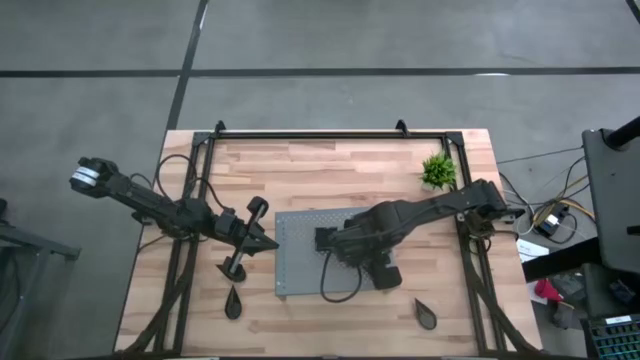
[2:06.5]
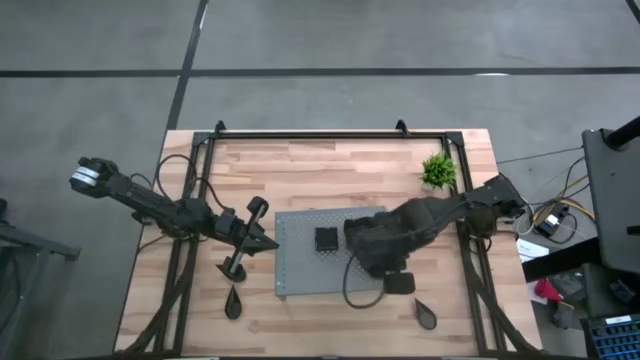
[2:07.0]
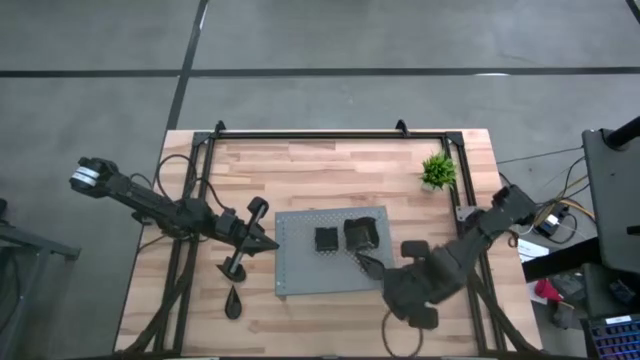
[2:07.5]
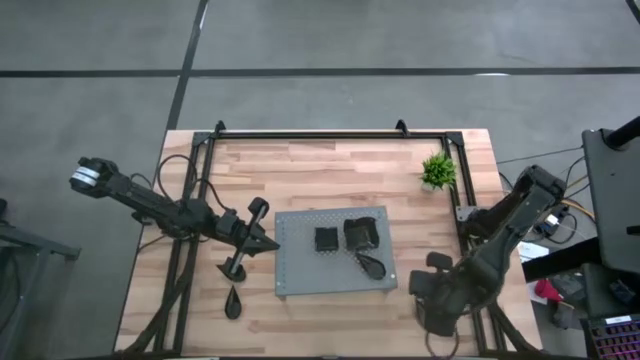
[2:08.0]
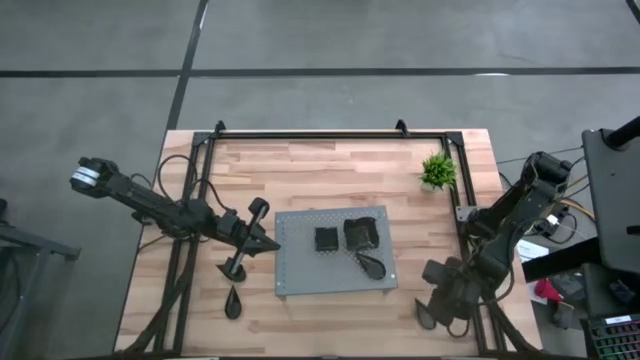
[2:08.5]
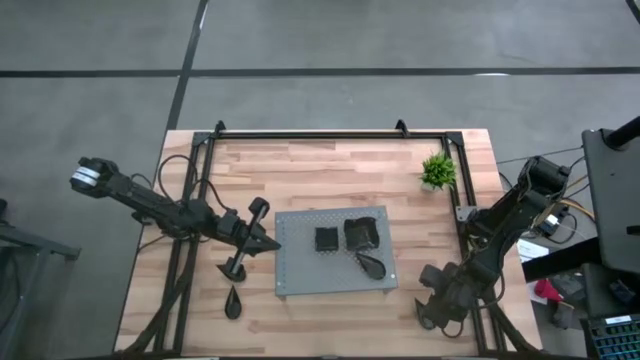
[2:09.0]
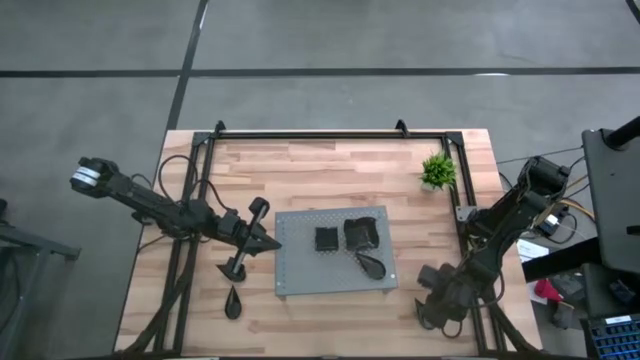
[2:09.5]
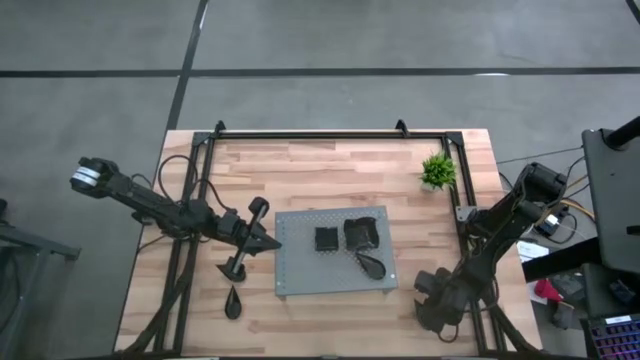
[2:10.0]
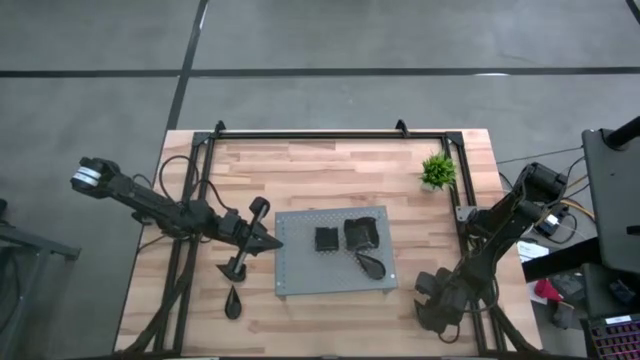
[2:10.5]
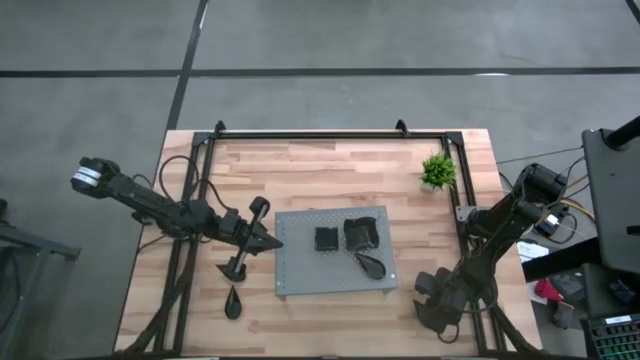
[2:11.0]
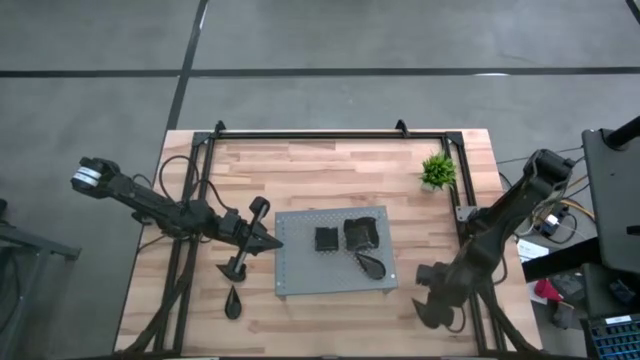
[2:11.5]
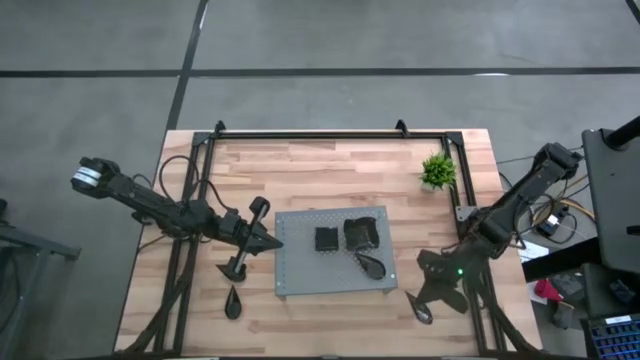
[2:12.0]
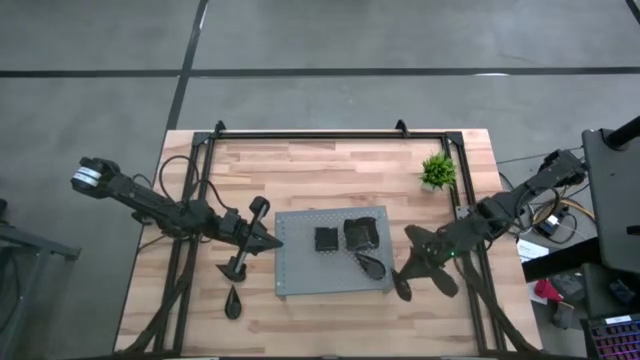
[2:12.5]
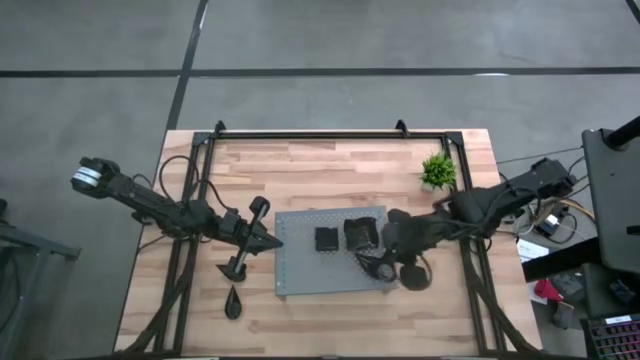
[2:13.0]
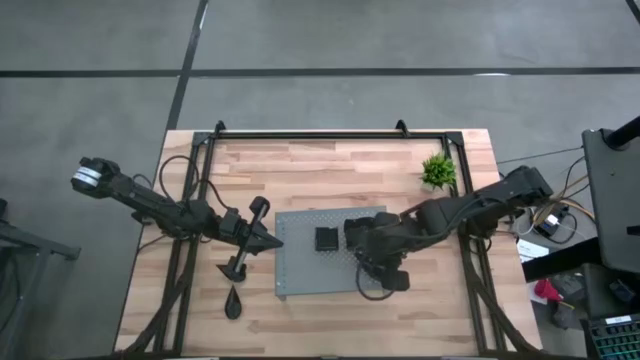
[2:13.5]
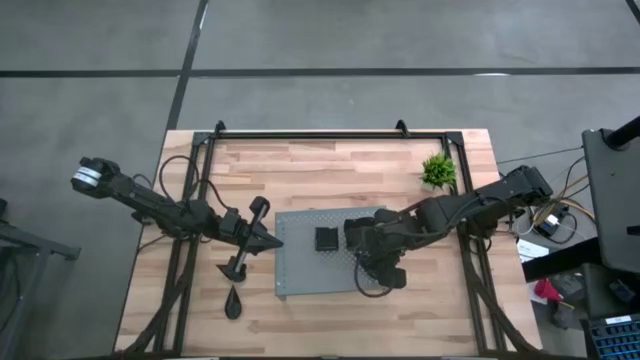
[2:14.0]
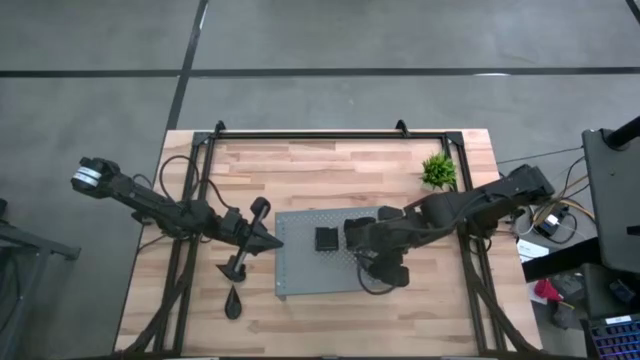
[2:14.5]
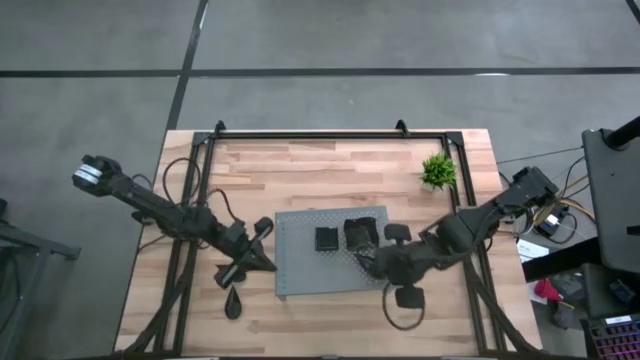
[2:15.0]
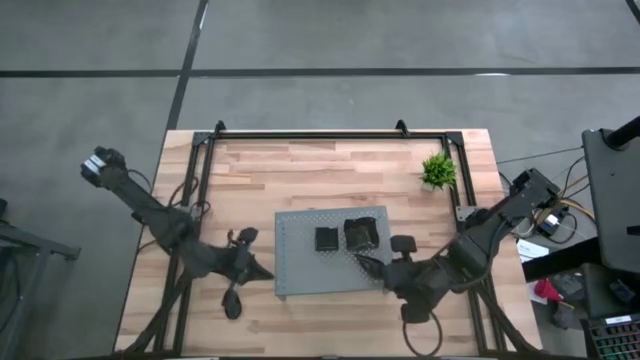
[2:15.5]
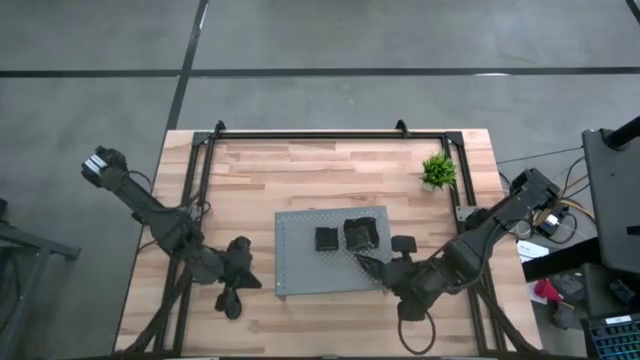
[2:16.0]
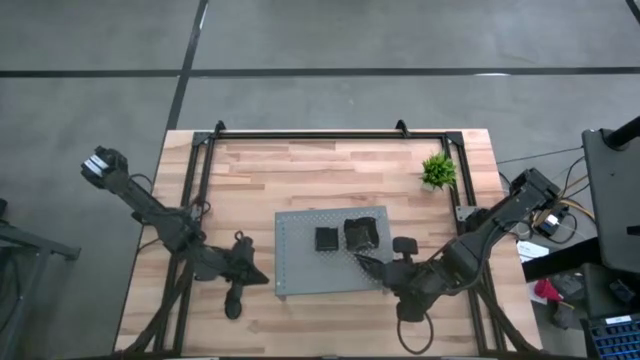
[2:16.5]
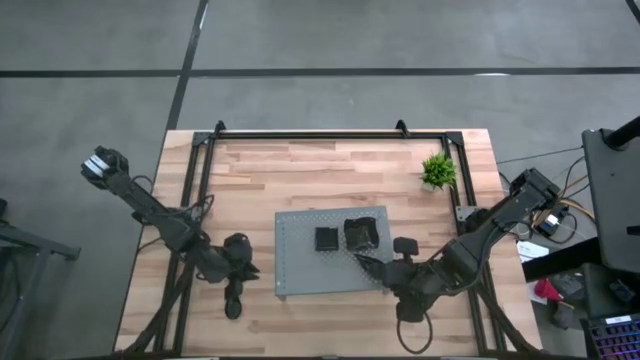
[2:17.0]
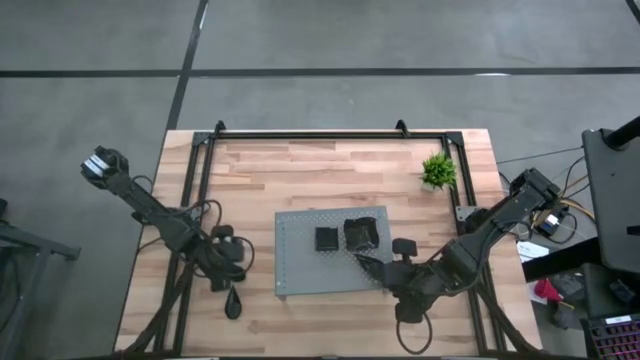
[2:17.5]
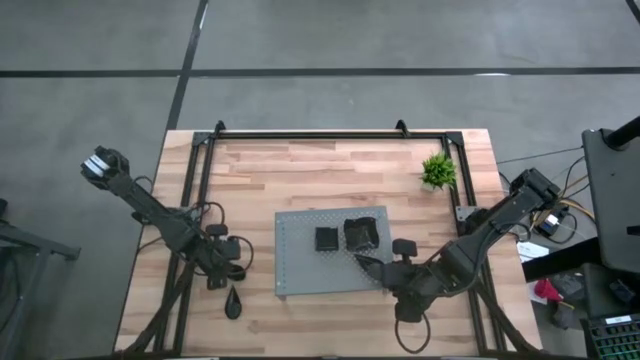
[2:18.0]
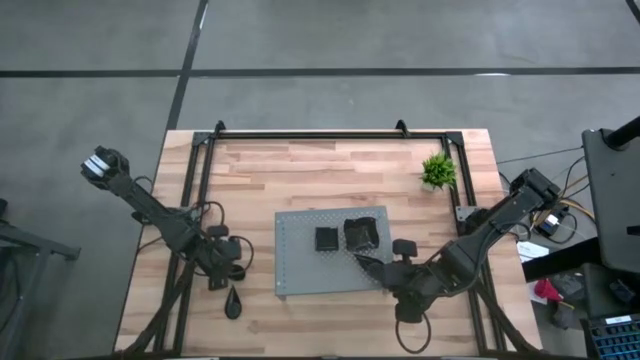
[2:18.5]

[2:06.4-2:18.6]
Task: Pick & Place Mini shaped plates
Stack the drop shaped plate on top of the drop shaped plate on the shelf

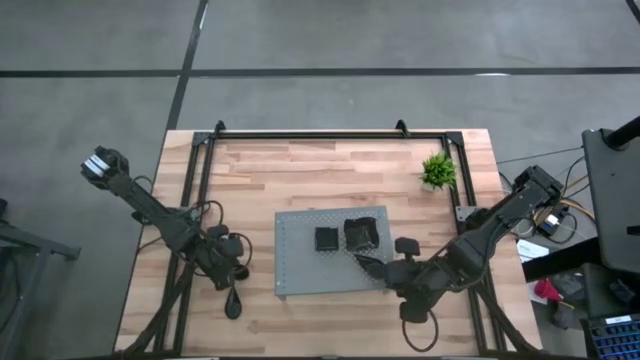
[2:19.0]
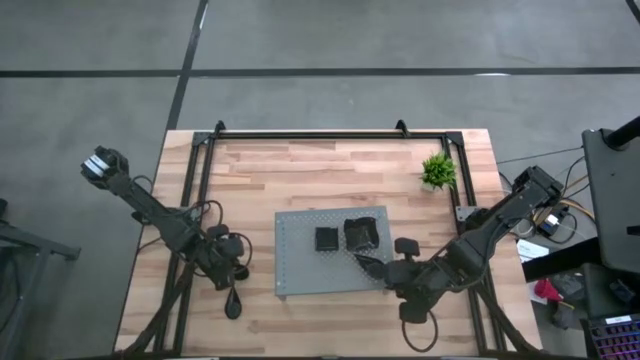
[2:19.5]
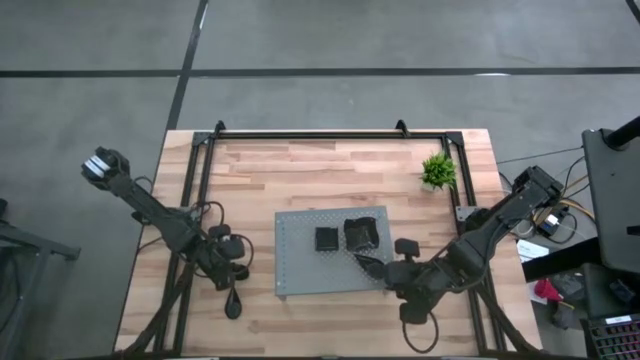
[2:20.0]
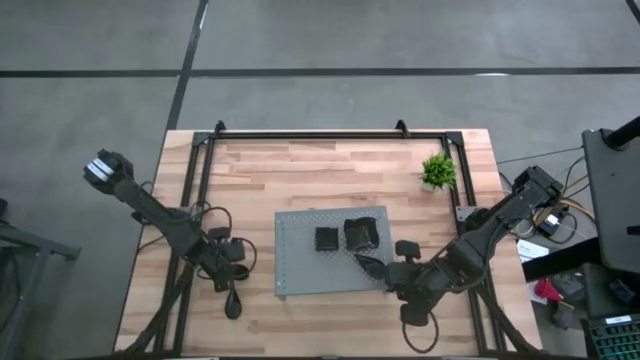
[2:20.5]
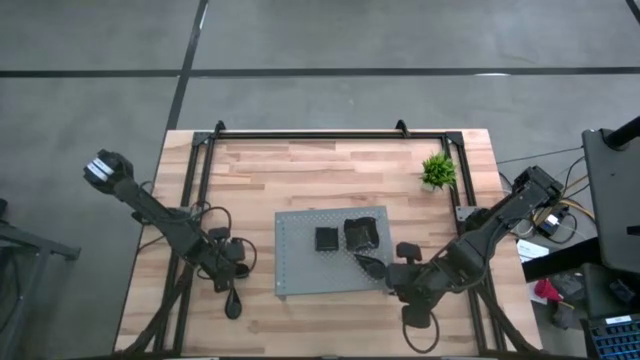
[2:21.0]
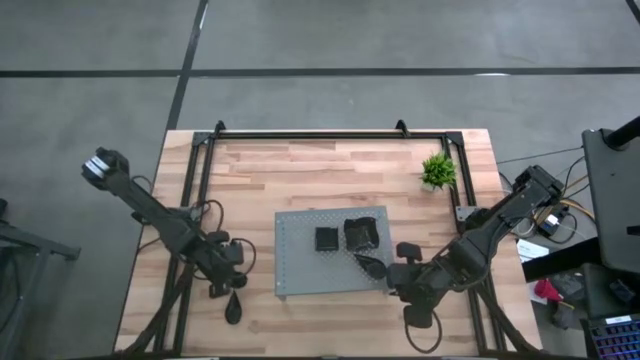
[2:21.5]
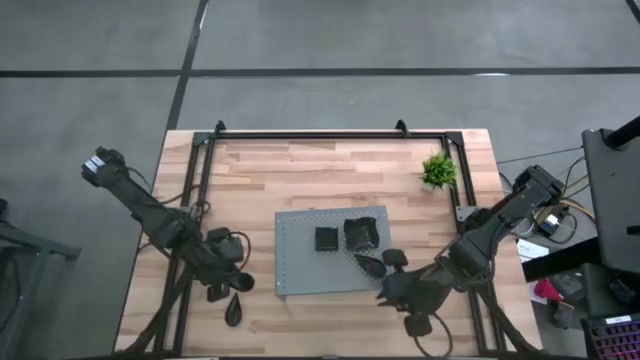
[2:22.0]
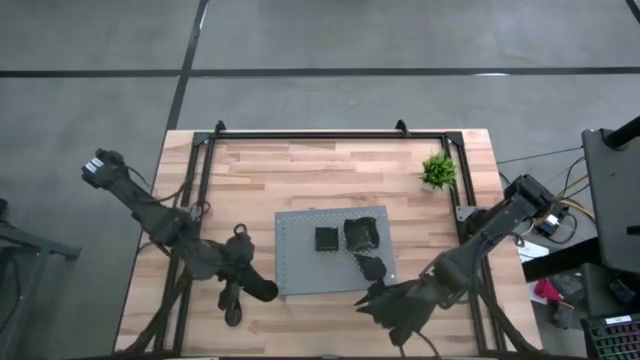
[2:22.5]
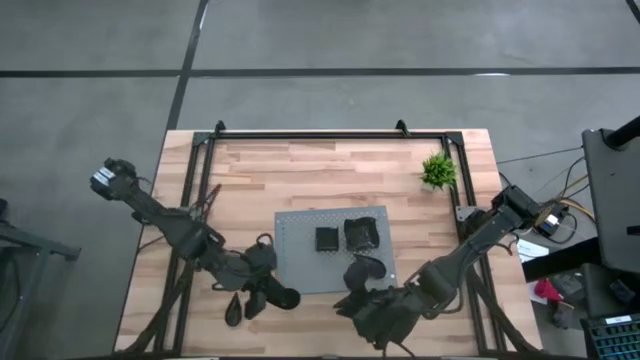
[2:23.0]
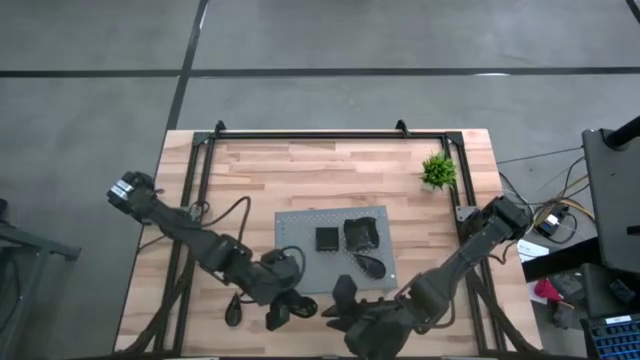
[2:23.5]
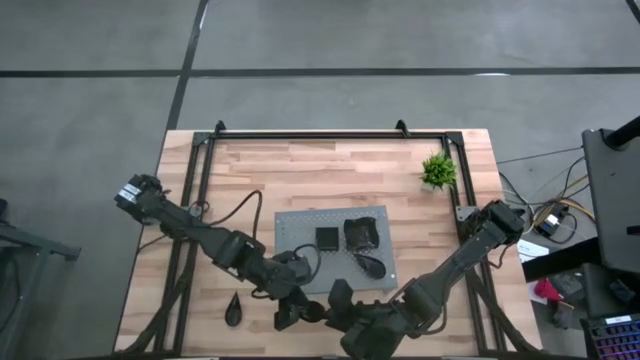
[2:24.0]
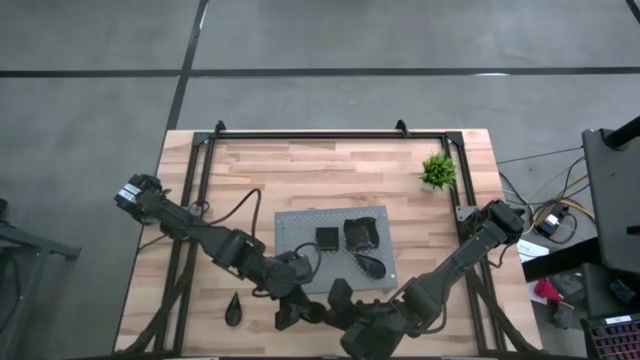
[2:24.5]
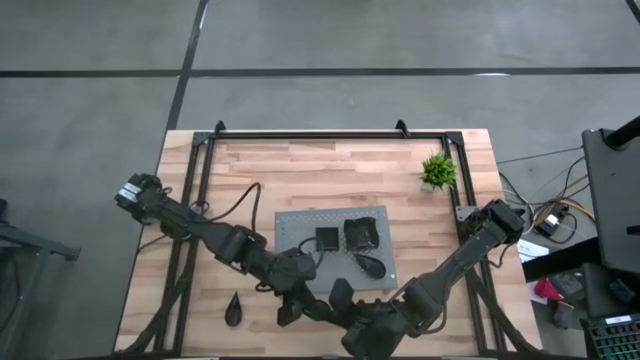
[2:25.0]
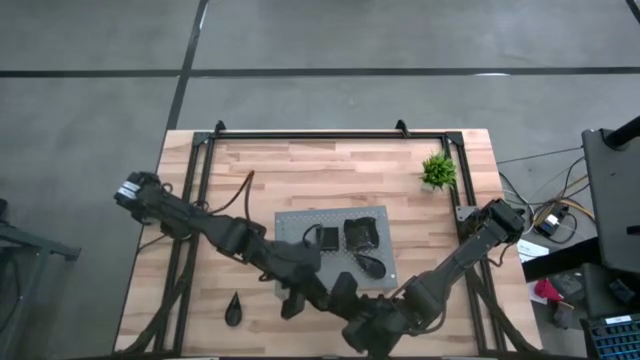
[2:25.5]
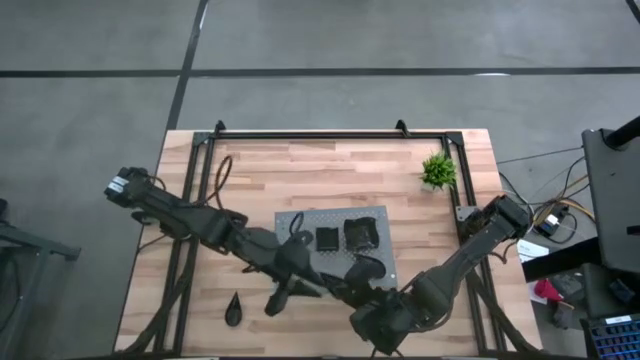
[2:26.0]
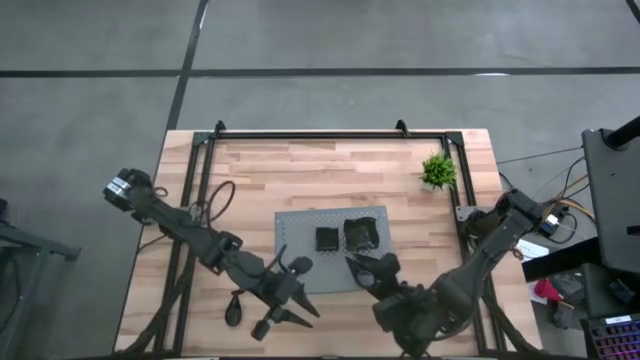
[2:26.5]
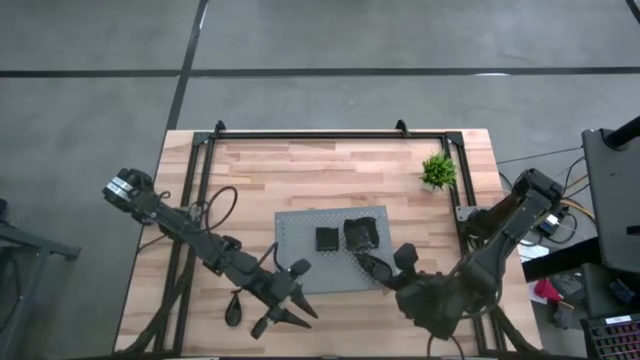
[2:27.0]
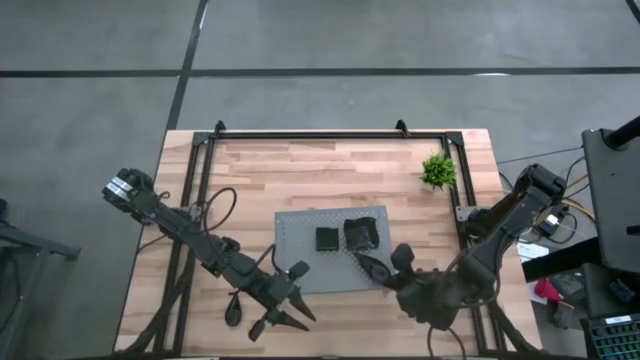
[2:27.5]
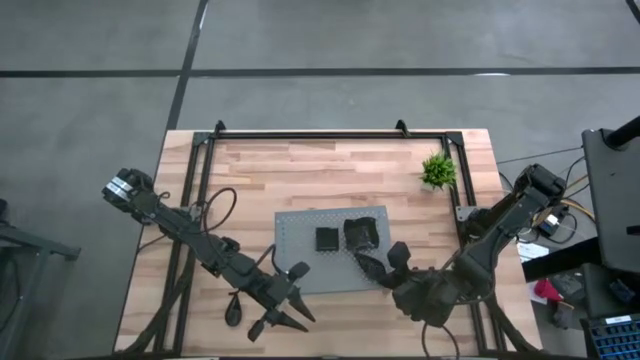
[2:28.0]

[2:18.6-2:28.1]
Stack the drop shaped plate on top of the drop shaped plate on the shelf
